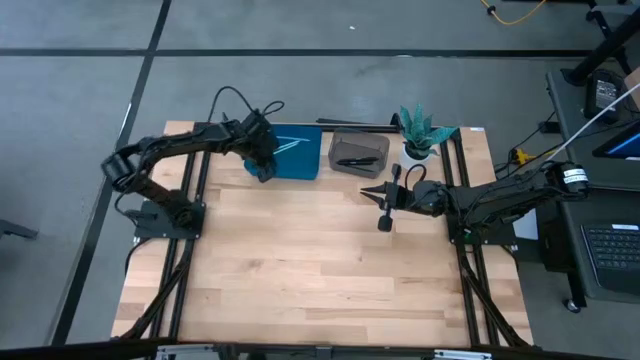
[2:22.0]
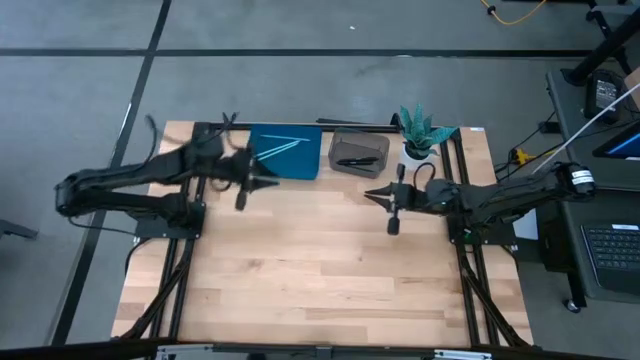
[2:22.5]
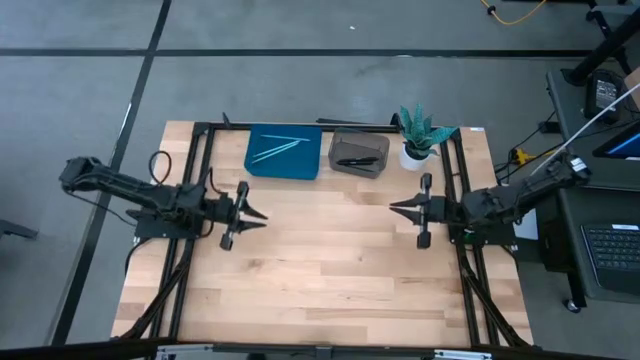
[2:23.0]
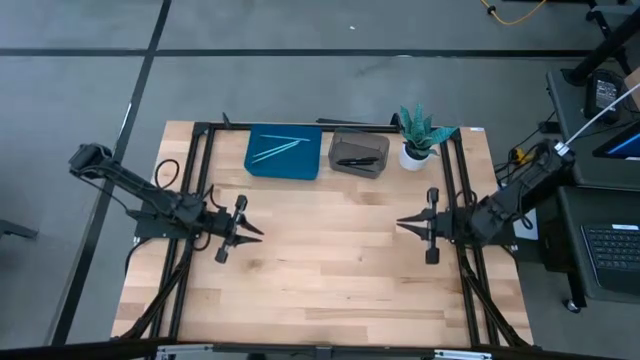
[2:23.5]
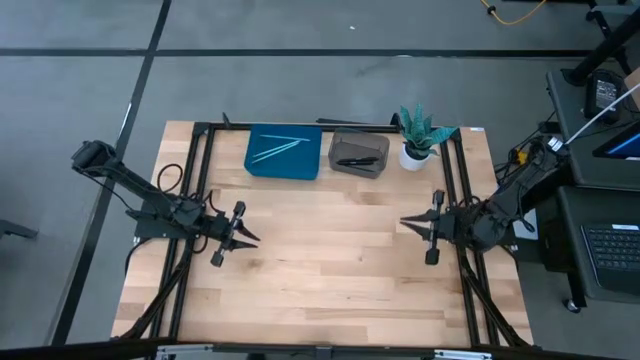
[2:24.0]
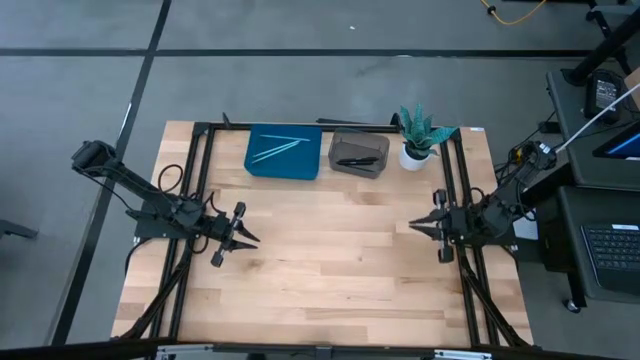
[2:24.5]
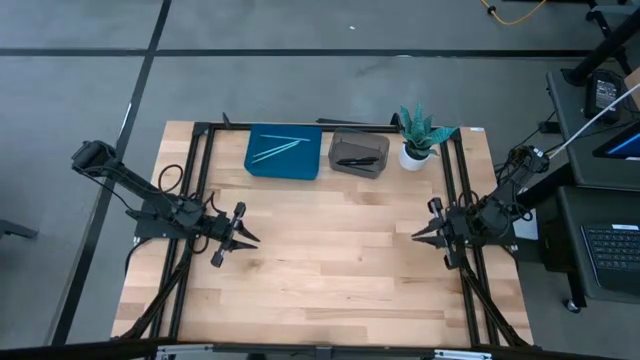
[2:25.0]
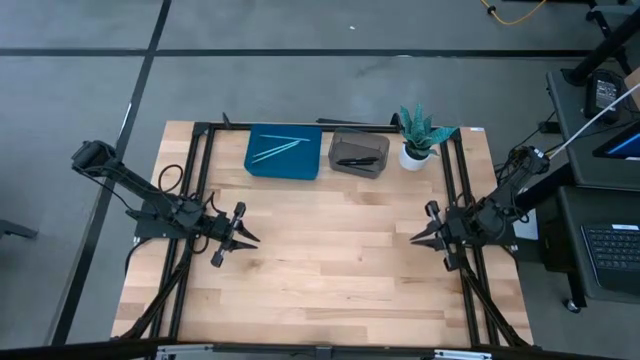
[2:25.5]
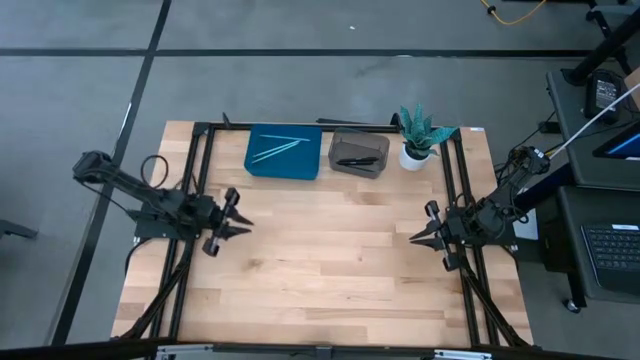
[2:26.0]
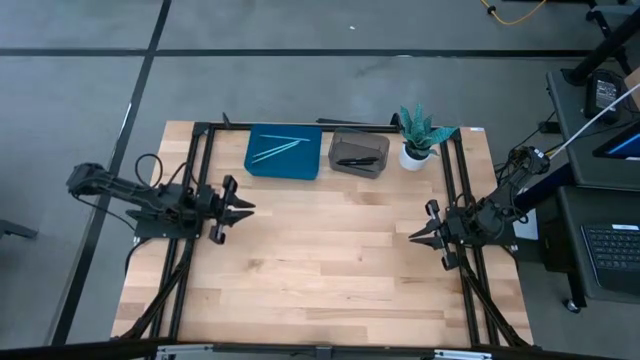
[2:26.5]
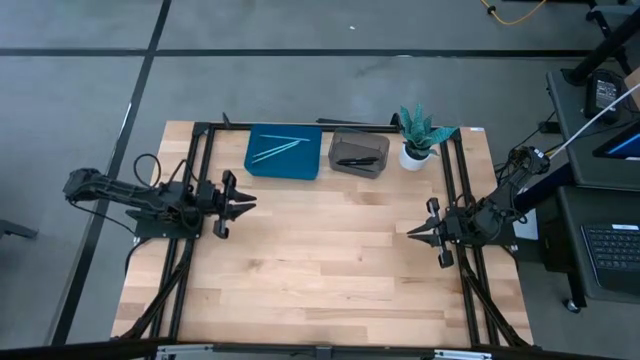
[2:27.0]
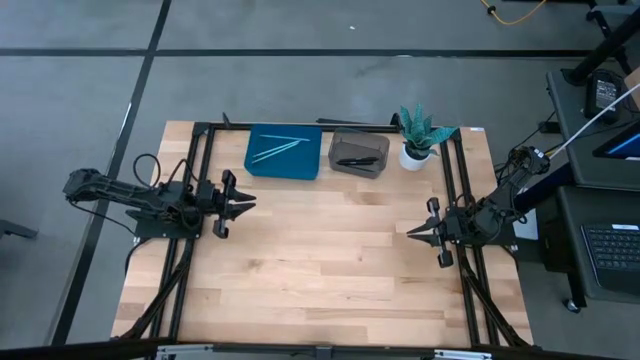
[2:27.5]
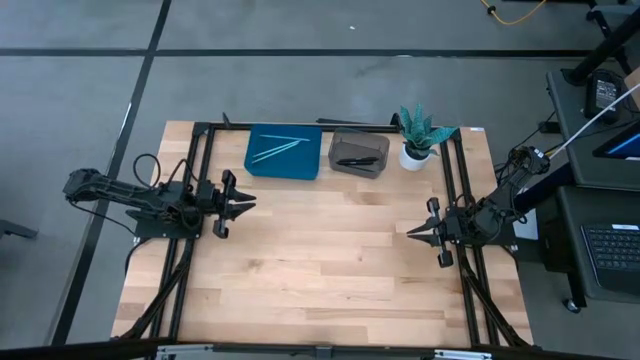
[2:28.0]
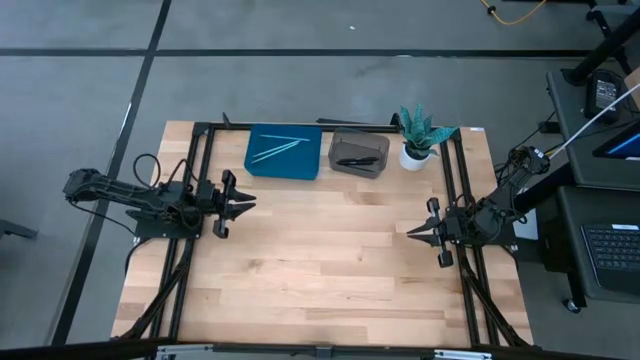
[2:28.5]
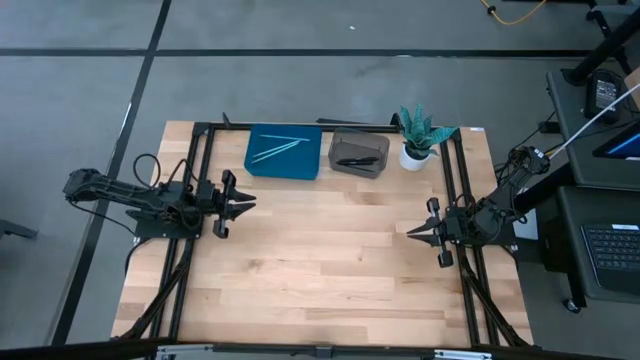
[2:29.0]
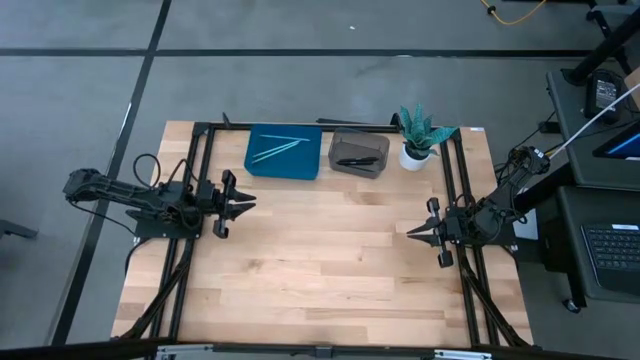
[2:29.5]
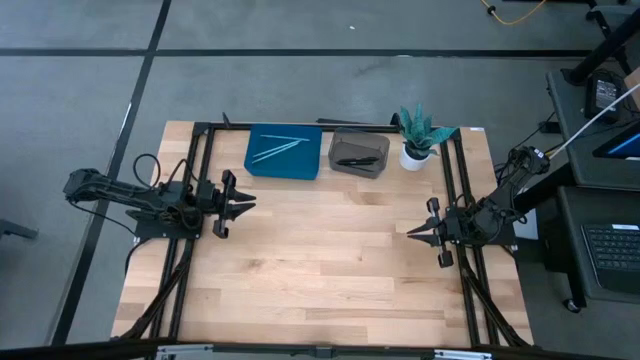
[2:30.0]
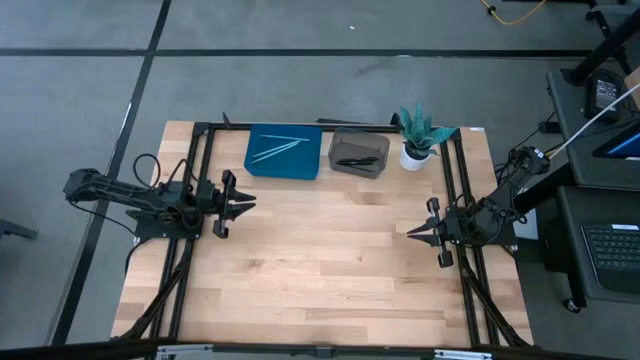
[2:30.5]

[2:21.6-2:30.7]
Task: Sort pens & pencils
Return to Home Position

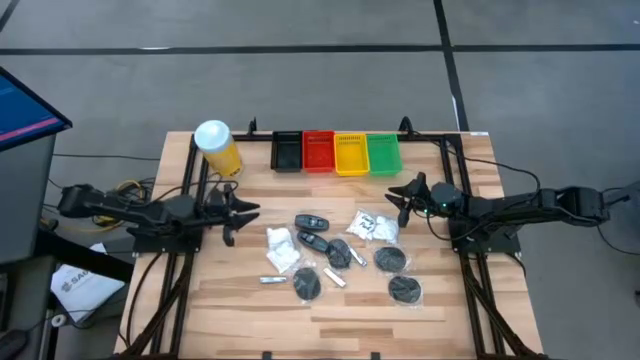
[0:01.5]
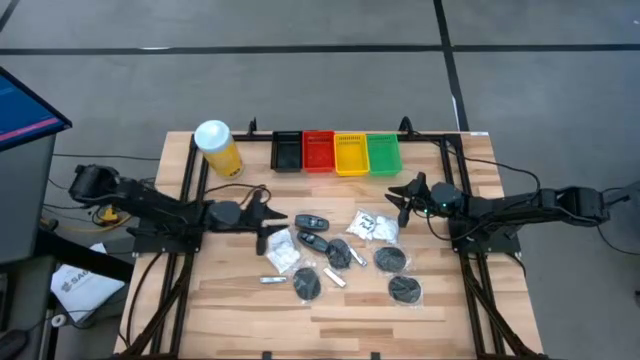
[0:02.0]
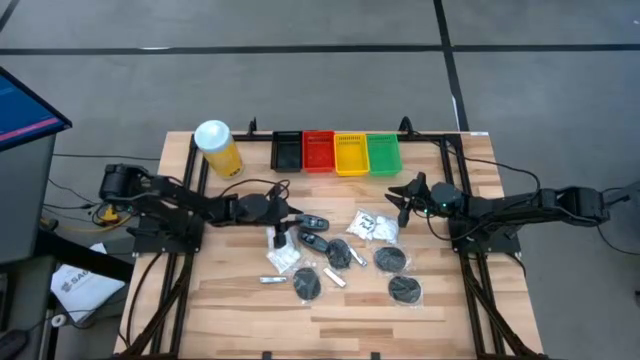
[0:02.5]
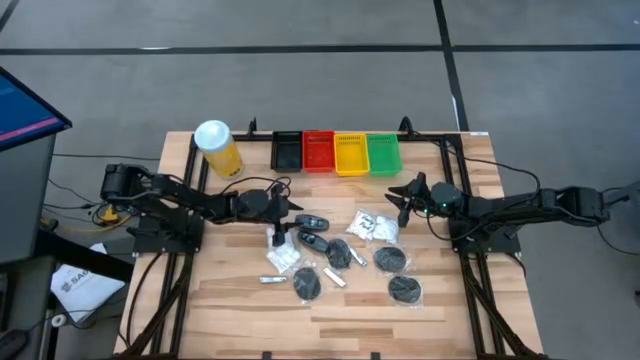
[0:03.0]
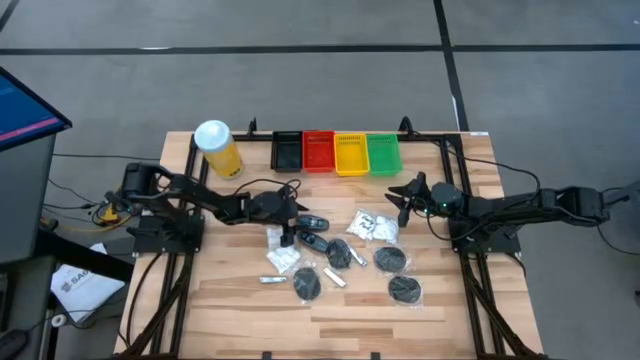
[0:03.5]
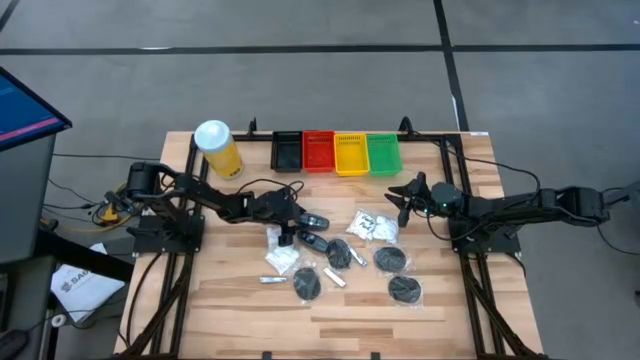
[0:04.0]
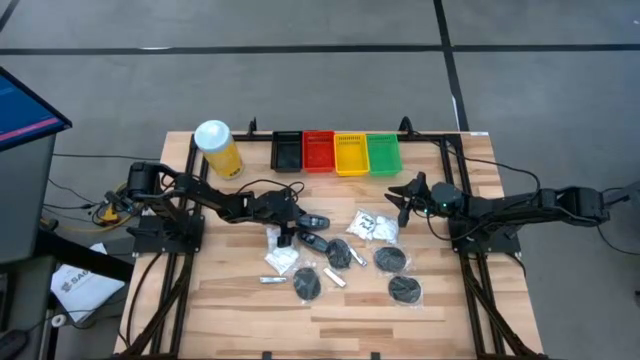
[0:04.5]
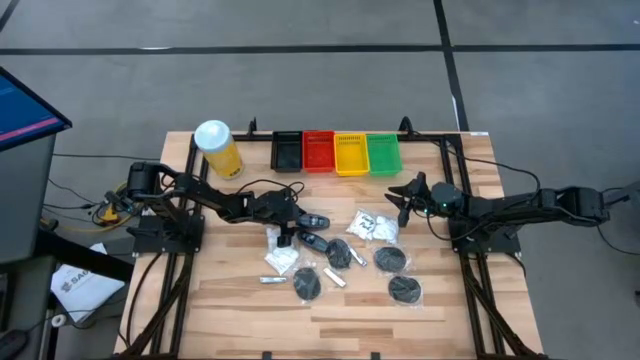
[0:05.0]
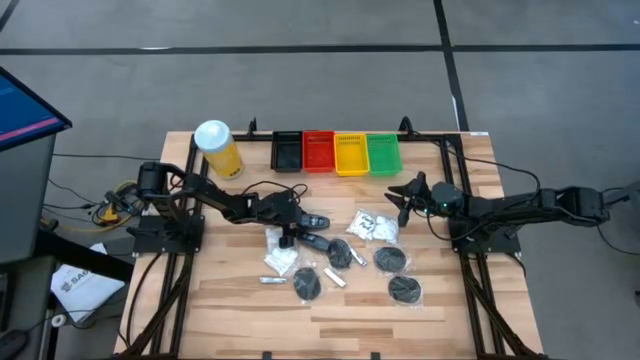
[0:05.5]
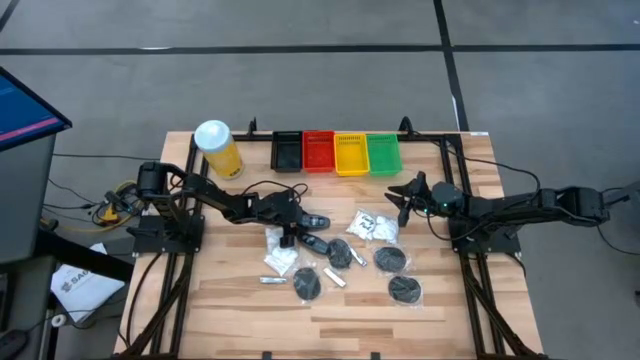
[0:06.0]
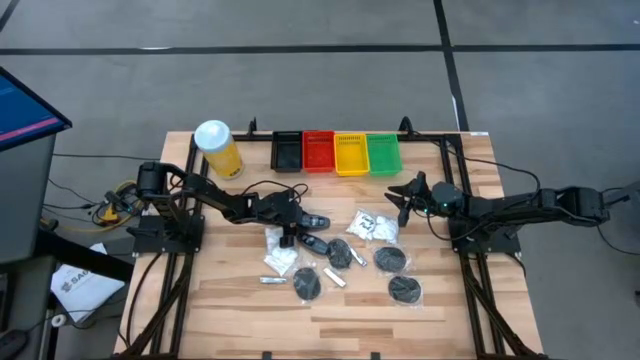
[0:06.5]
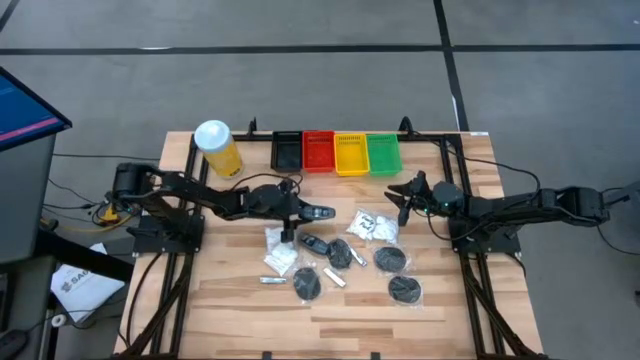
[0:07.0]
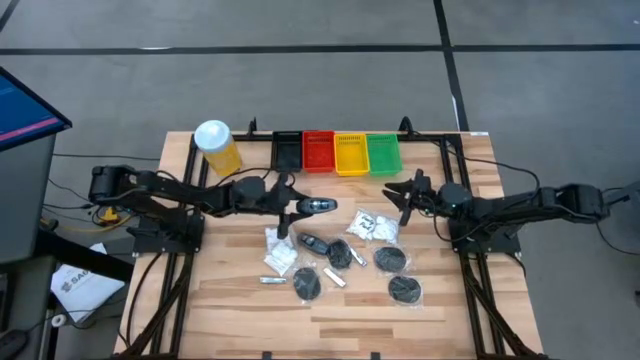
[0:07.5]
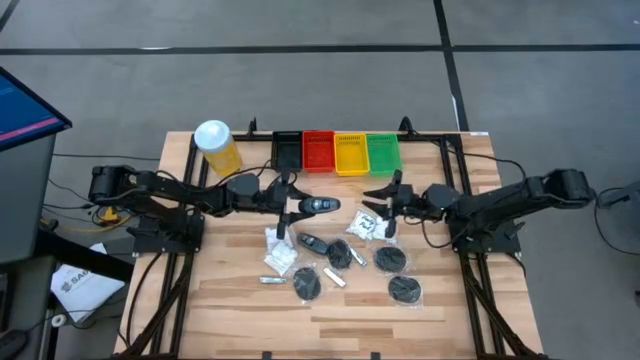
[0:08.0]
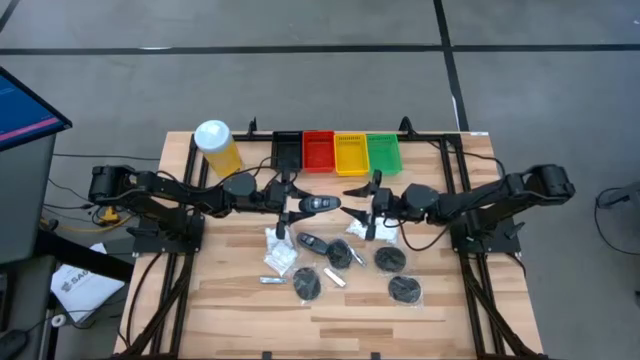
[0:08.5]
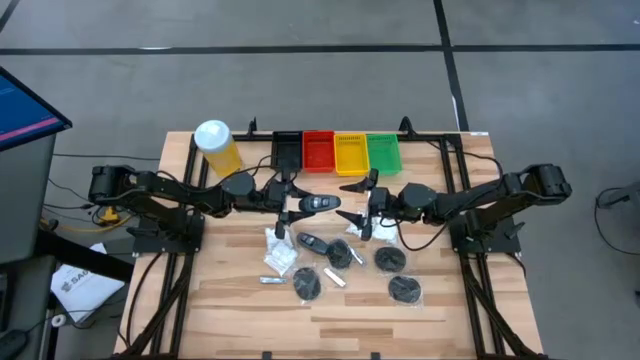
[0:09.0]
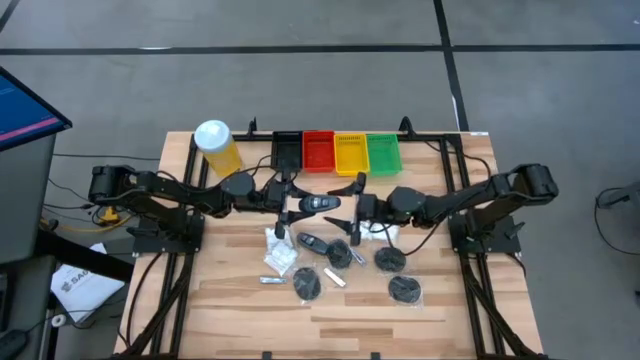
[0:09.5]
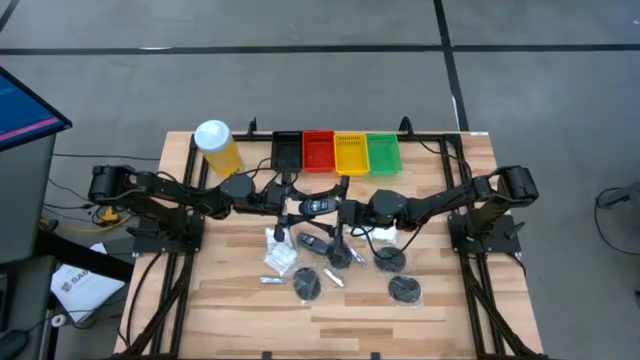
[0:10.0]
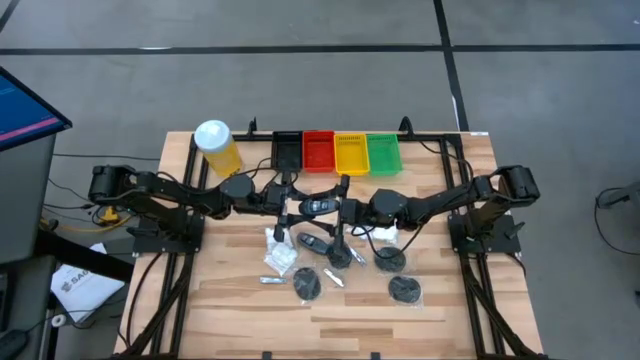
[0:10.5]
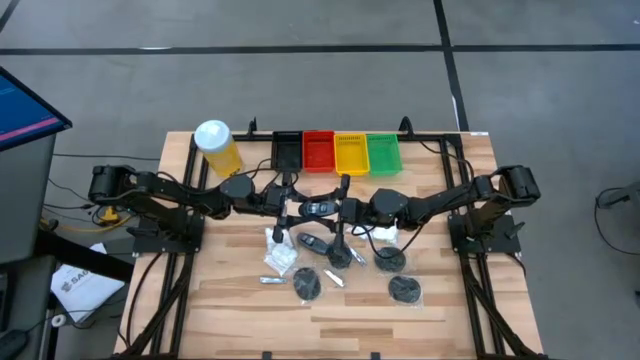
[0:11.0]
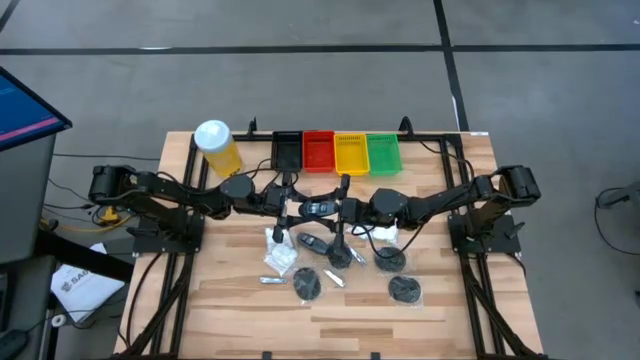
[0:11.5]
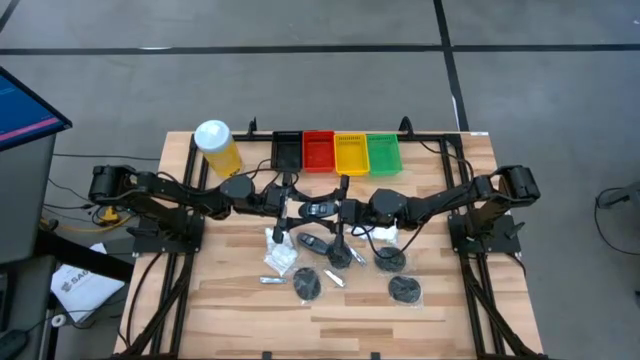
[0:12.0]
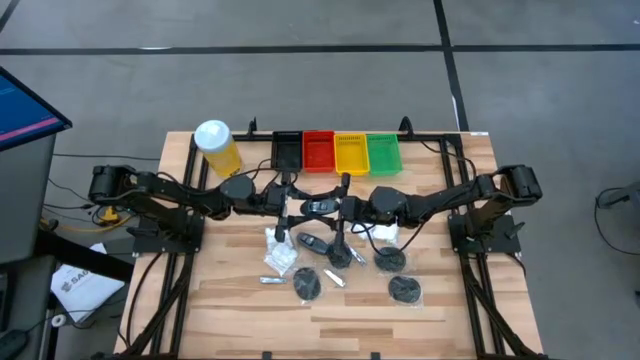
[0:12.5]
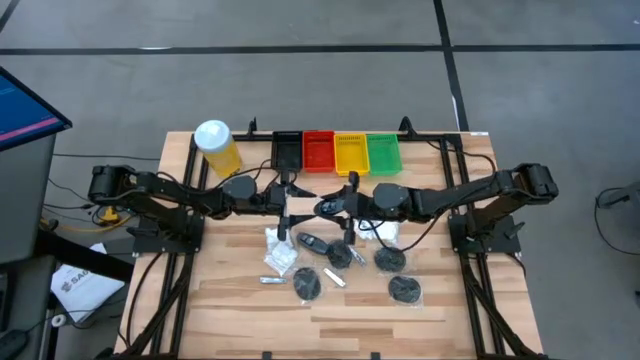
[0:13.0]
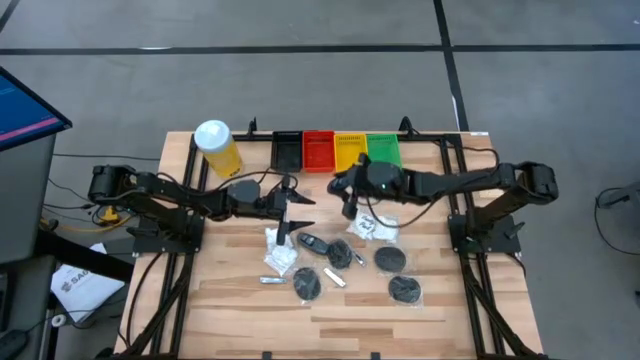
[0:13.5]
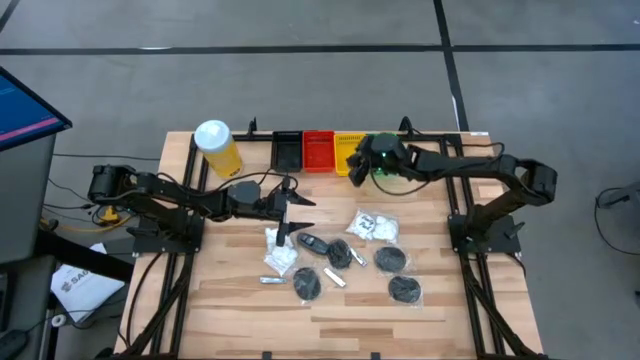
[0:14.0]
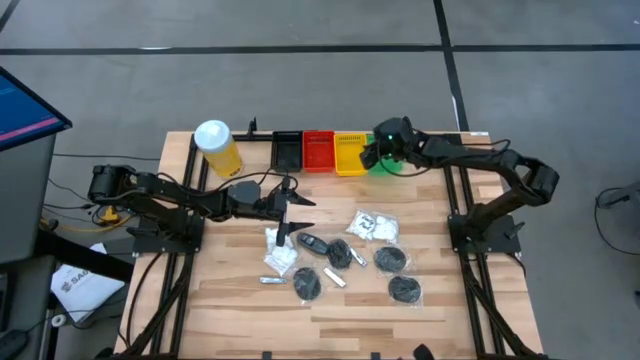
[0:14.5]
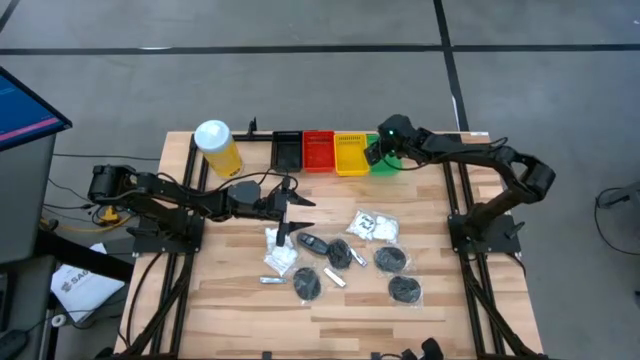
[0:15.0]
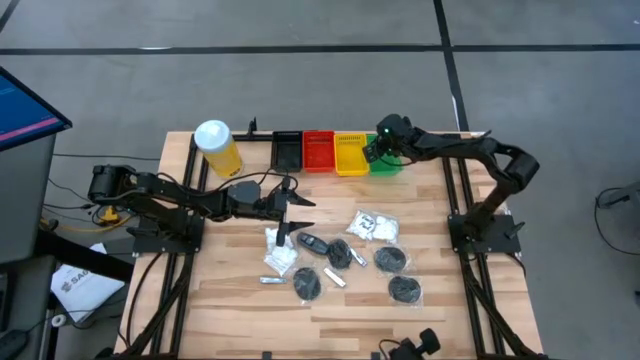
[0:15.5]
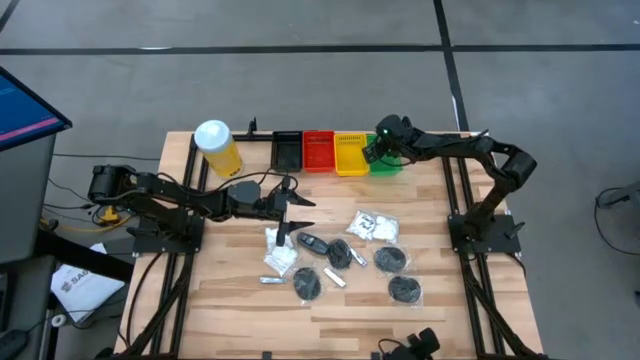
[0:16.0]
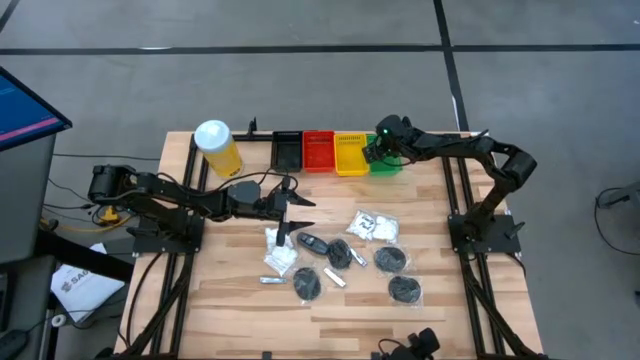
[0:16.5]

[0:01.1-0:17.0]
Task: Pick & Place Travel size toiletries
Put the deodorant into the green bin
